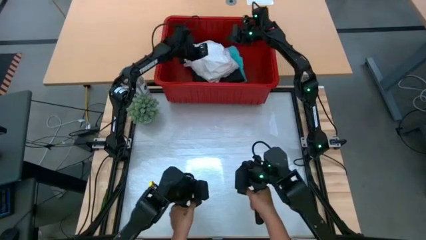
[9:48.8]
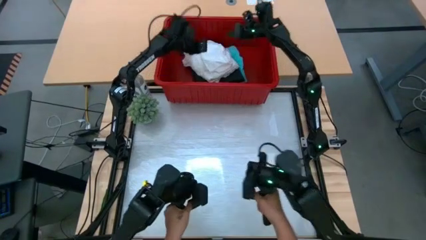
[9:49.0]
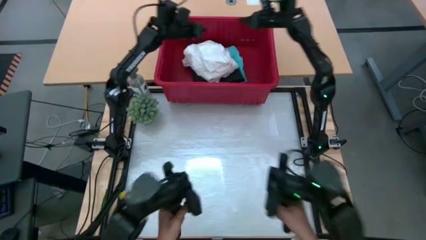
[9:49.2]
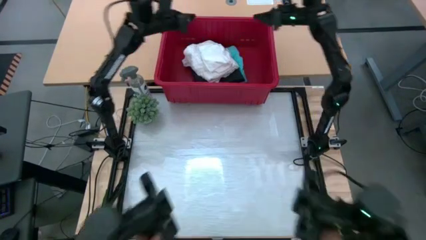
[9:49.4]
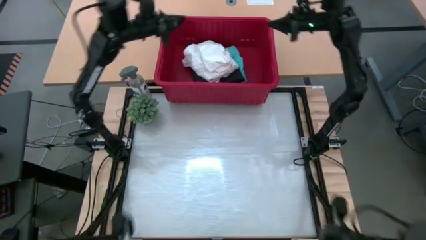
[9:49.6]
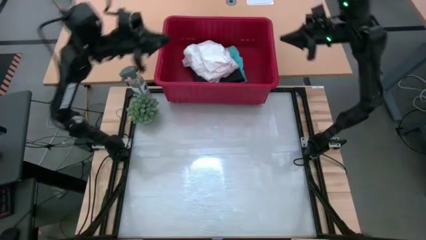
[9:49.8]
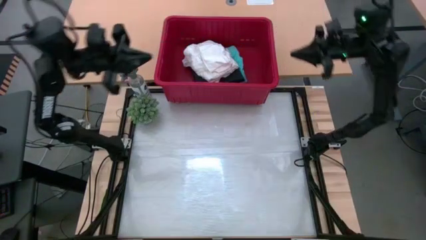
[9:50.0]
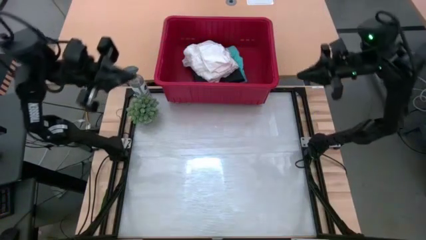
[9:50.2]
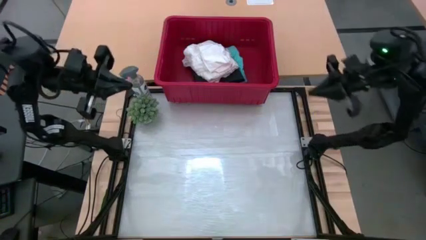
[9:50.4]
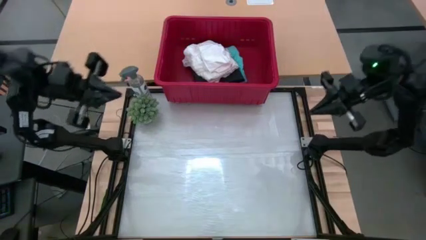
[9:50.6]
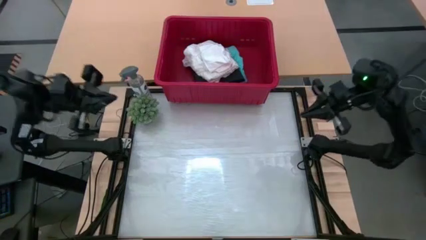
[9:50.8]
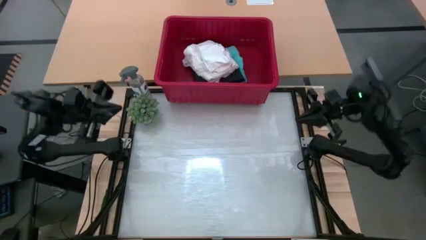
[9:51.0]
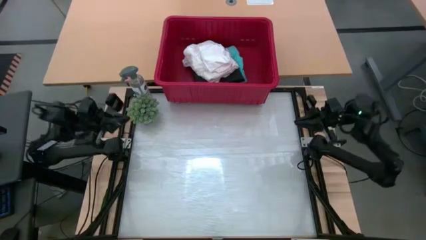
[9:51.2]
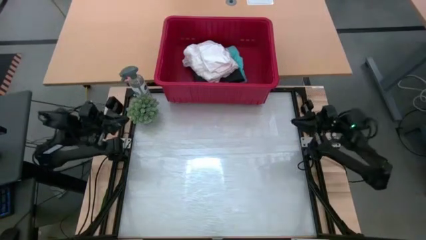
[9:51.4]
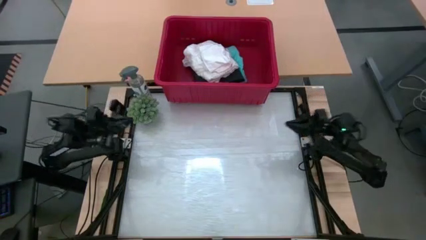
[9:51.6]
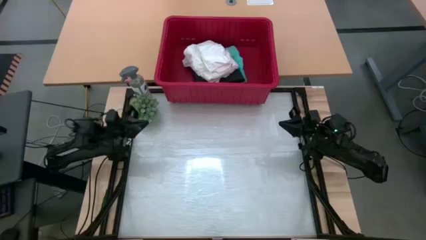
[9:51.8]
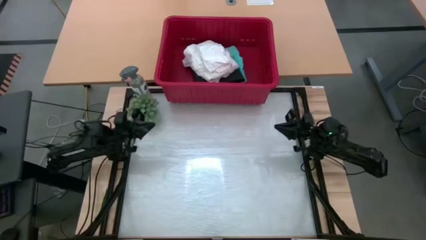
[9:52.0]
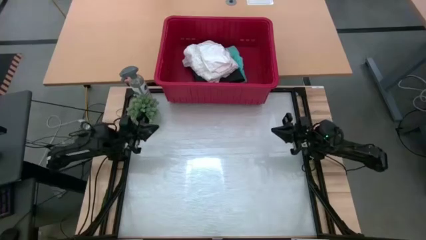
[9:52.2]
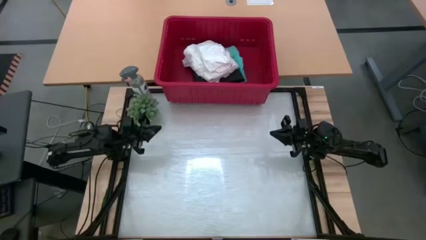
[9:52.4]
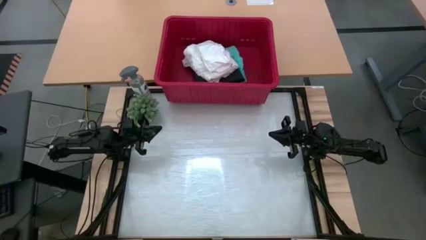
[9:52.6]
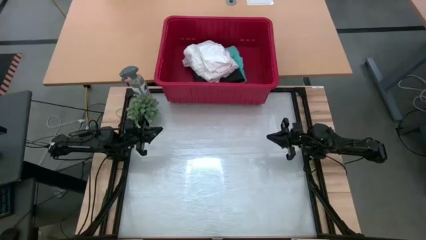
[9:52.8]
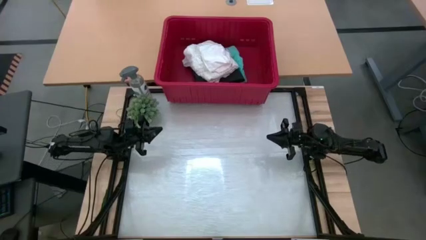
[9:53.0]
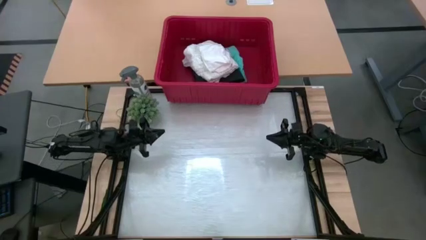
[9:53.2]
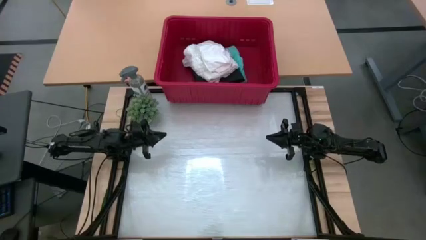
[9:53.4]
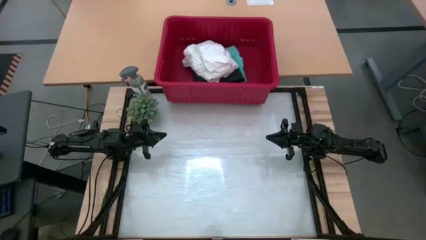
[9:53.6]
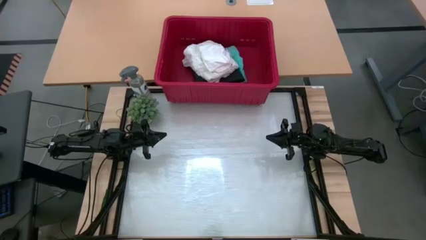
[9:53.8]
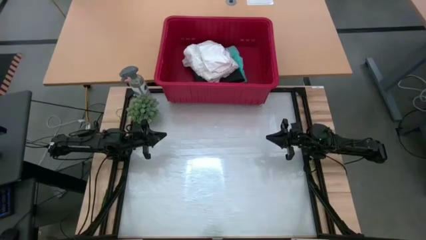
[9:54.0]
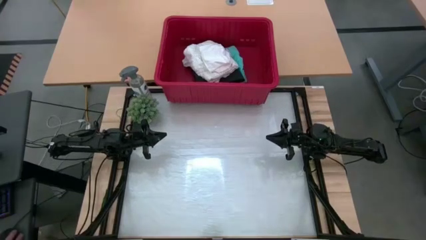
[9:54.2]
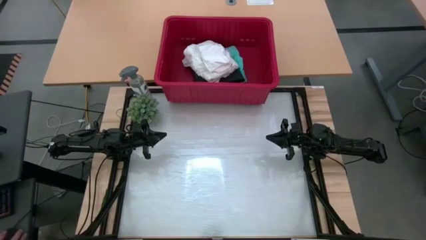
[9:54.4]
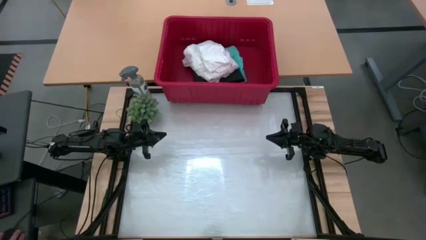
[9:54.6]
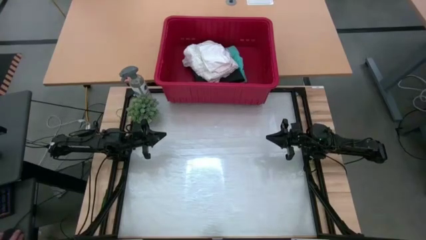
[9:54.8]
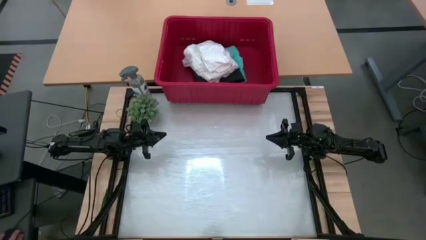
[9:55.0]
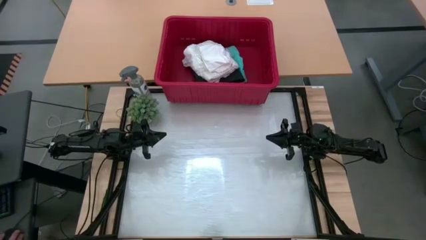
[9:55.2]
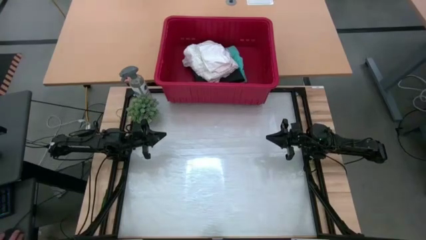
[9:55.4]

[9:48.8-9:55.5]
Task: Fold Laundry from Bin
Return to Home Position

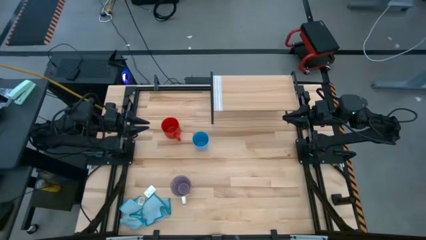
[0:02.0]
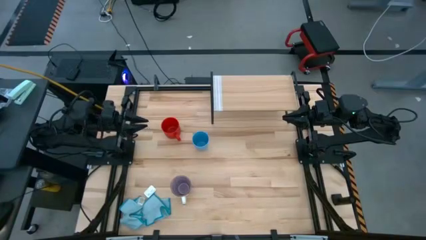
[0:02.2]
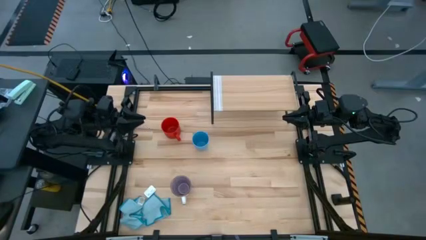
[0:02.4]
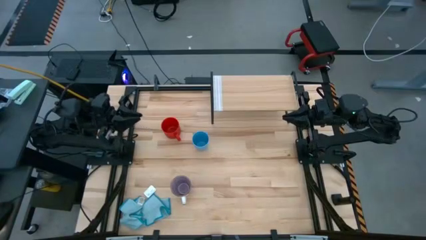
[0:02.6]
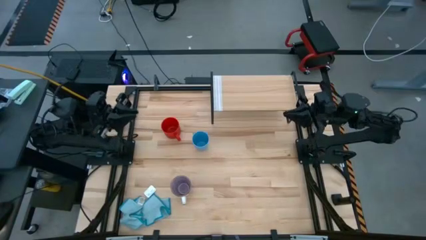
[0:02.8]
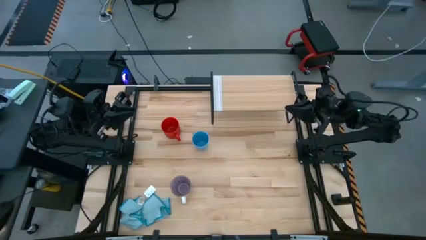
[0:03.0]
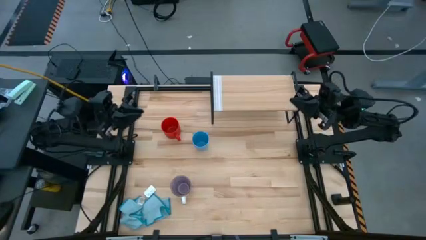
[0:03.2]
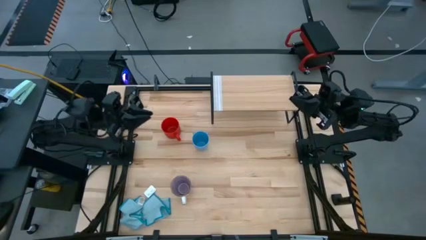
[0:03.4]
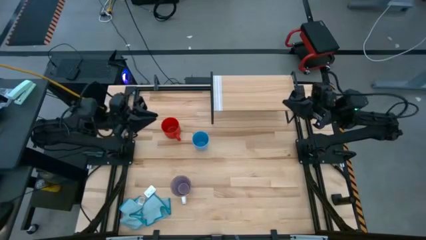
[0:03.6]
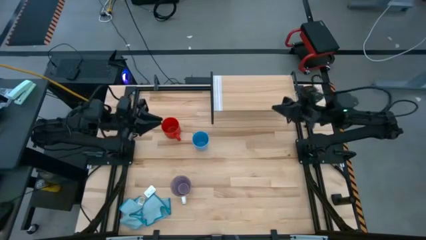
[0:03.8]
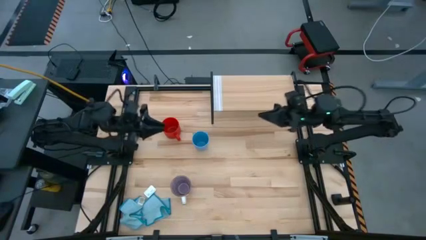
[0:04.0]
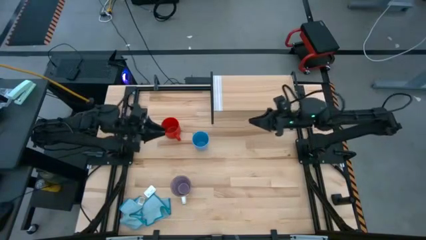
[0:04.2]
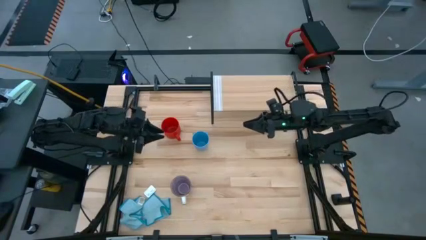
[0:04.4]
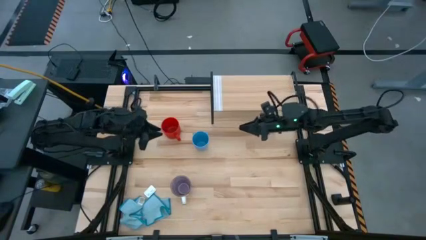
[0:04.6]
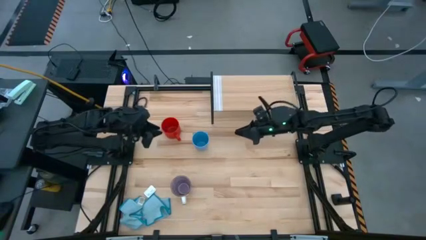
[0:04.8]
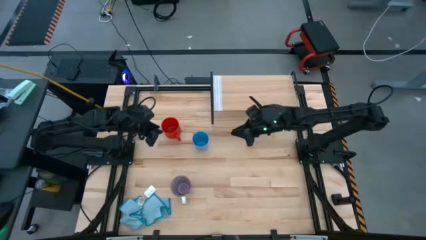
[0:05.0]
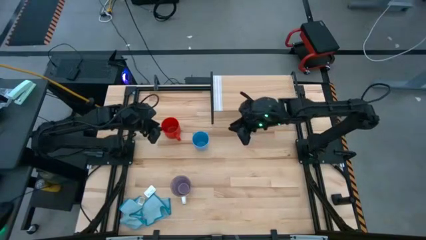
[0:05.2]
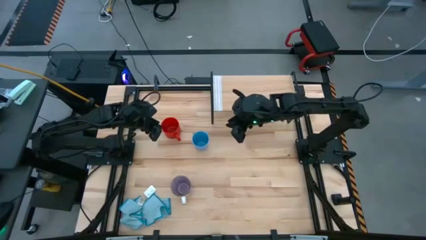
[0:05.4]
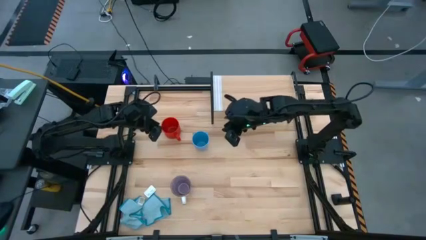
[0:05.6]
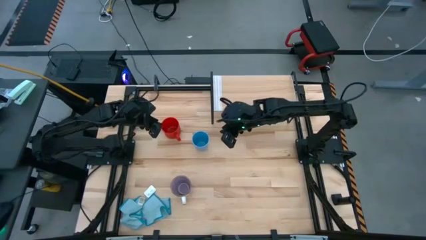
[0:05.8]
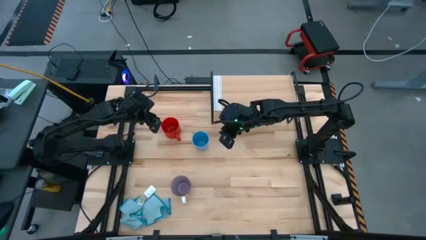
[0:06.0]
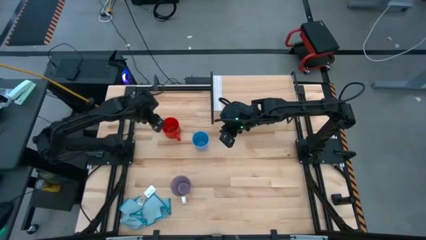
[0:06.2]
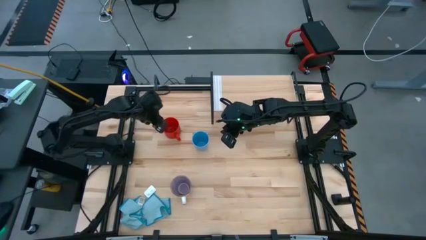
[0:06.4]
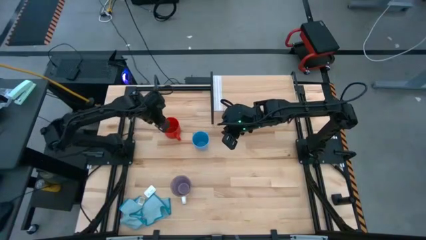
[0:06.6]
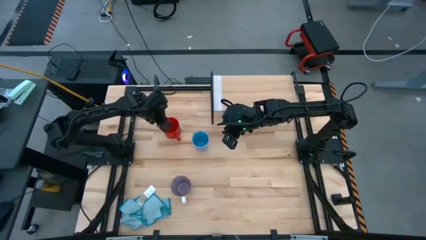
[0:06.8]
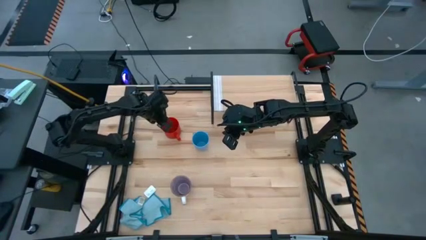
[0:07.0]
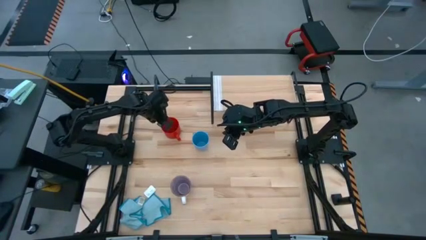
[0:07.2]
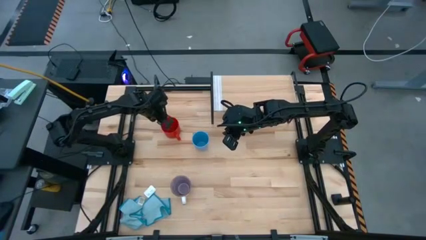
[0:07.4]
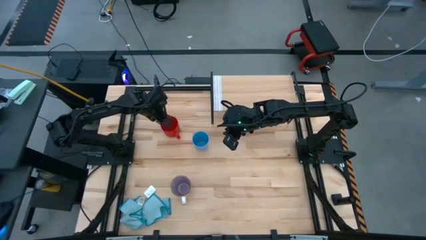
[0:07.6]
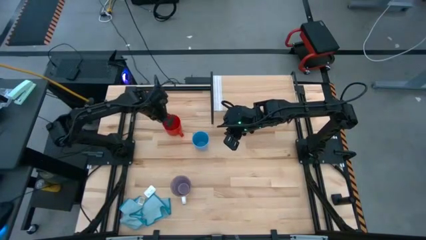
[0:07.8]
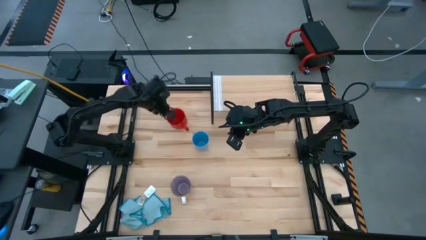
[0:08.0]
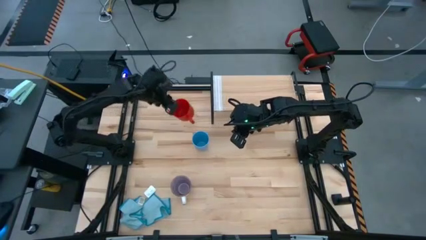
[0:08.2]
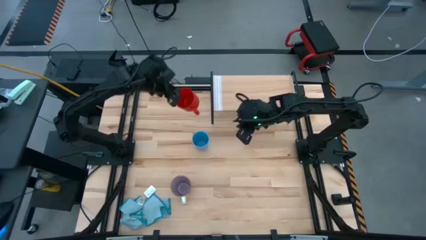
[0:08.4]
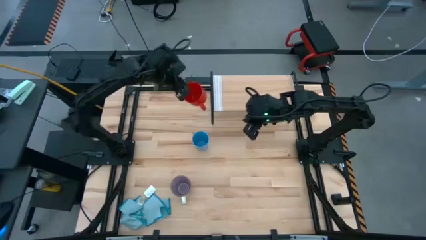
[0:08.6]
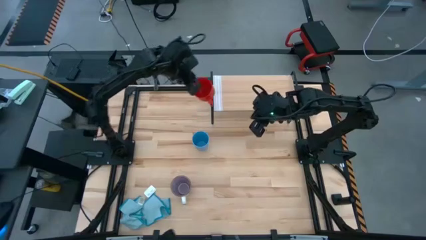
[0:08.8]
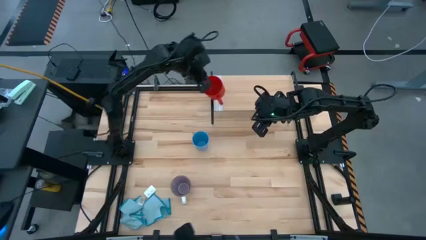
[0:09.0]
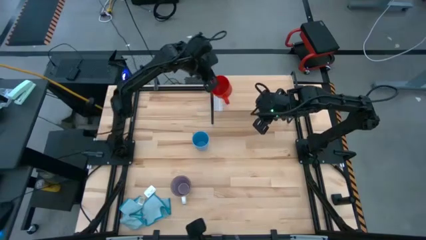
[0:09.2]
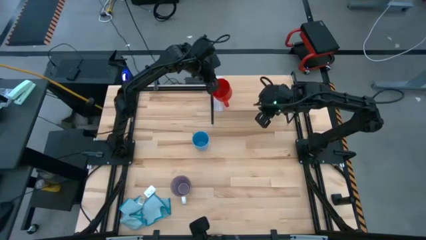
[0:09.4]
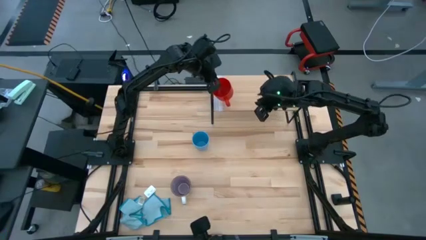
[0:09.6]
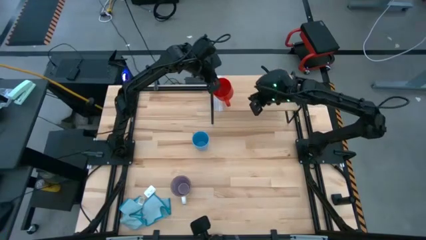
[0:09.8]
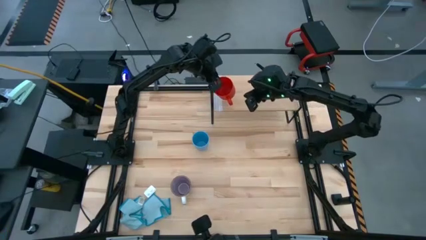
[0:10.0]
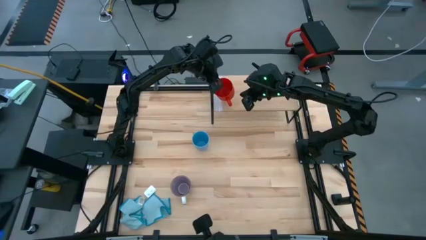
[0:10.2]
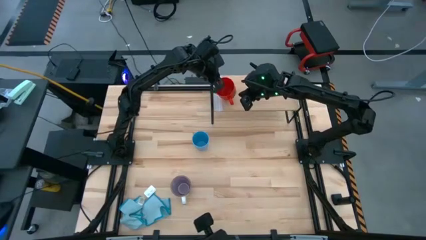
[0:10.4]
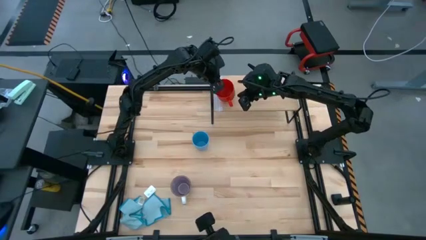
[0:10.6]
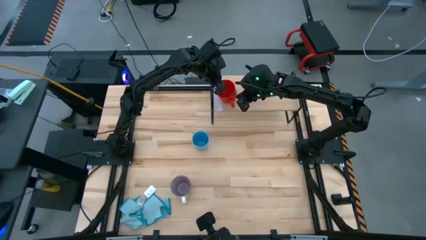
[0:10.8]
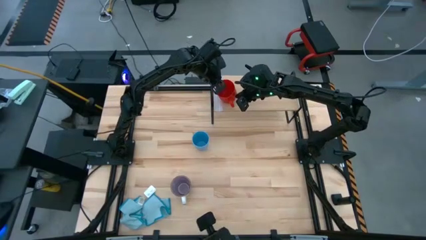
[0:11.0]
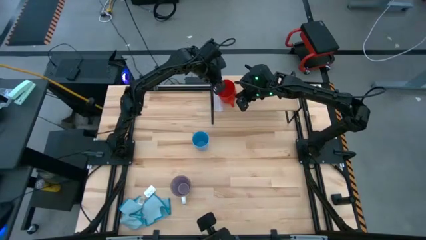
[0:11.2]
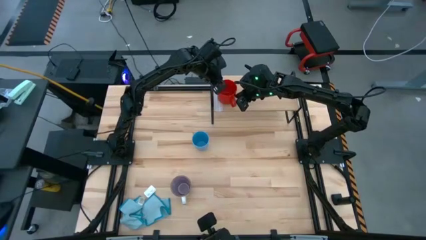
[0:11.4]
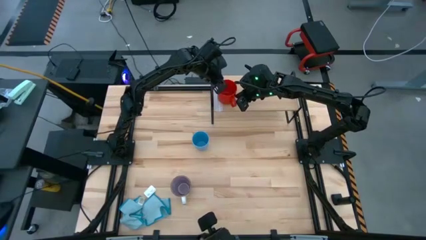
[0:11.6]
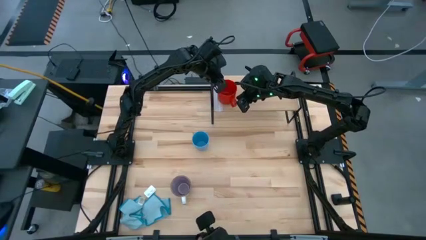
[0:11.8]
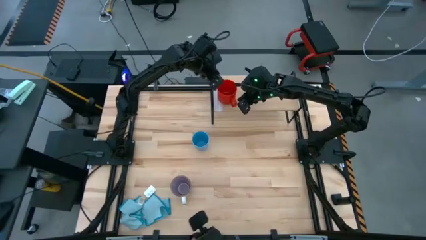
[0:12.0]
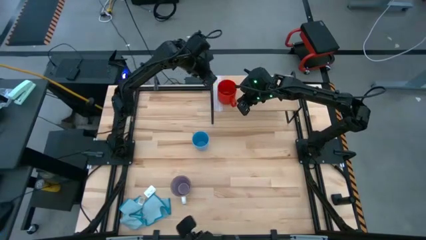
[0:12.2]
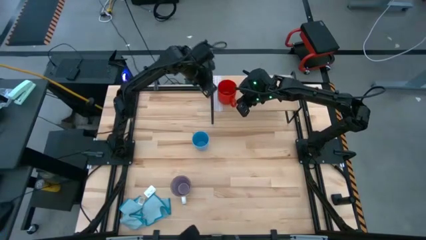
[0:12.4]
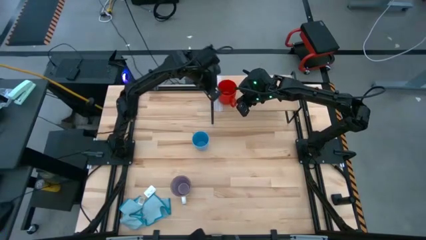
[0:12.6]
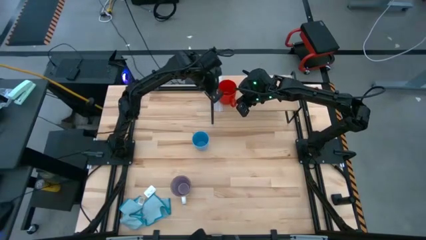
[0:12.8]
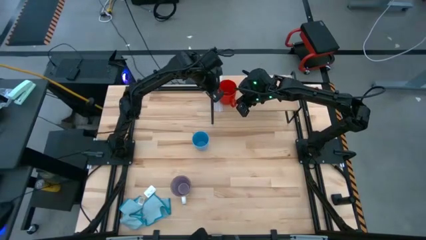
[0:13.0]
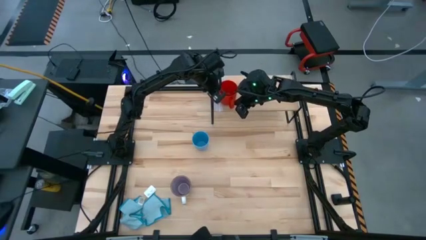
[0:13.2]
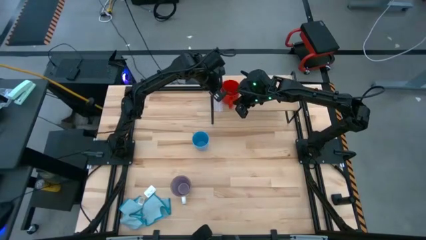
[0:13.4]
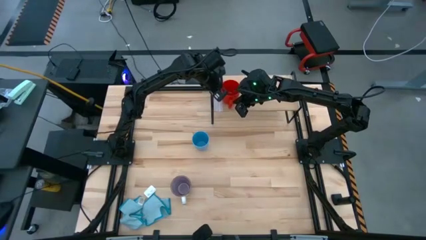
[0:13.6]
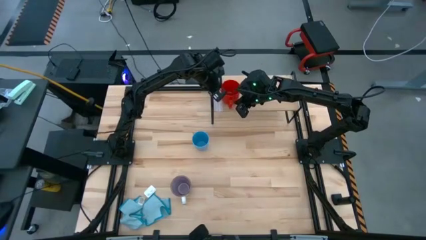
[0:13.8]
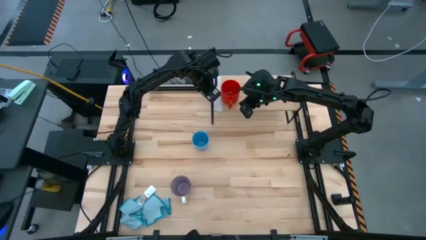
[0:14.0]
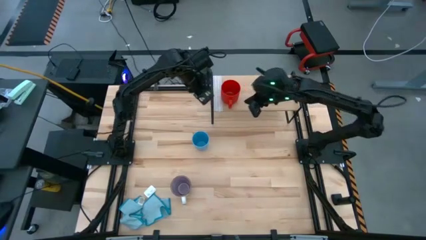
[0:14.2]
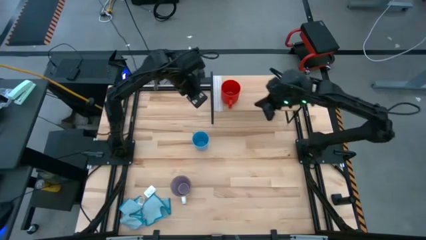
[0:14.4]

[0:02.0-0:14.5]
Task: Stack small to large cups/mugs on shelf
Put the red mug on the shelf
